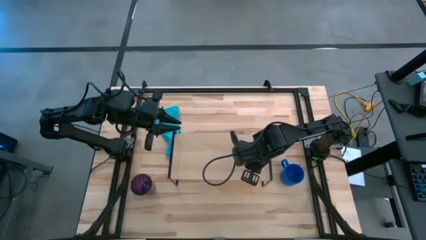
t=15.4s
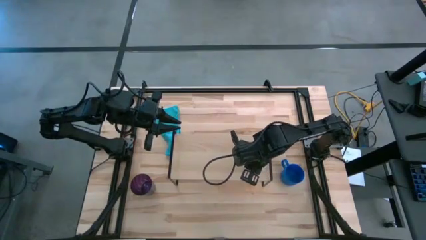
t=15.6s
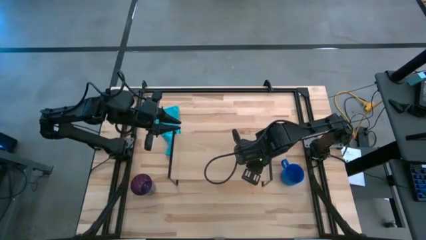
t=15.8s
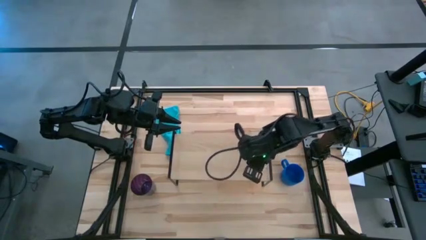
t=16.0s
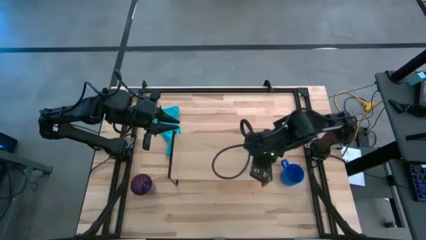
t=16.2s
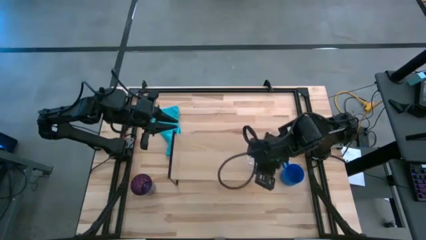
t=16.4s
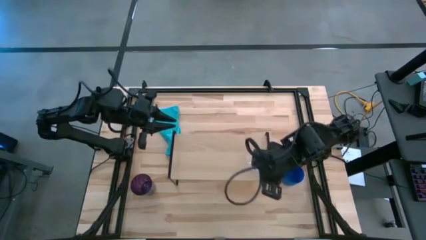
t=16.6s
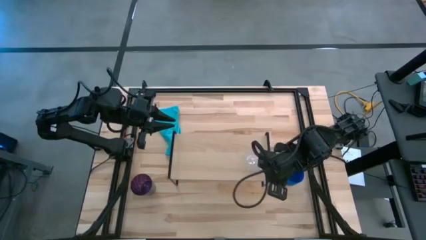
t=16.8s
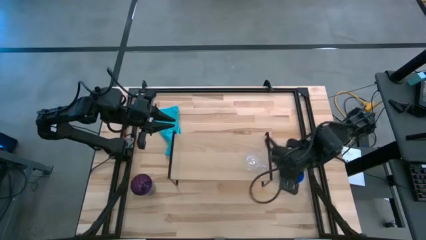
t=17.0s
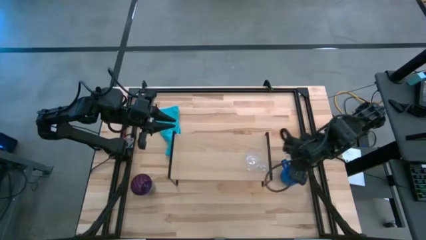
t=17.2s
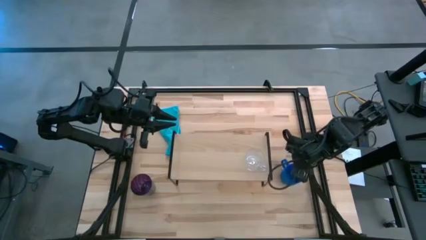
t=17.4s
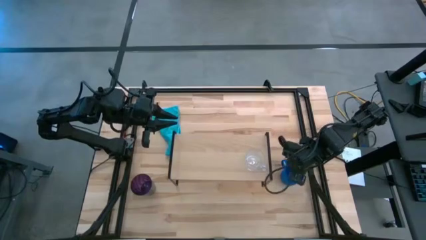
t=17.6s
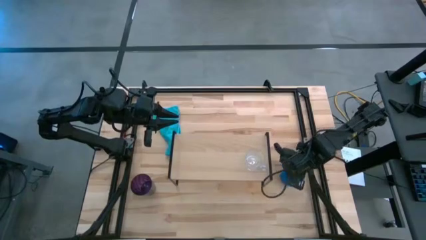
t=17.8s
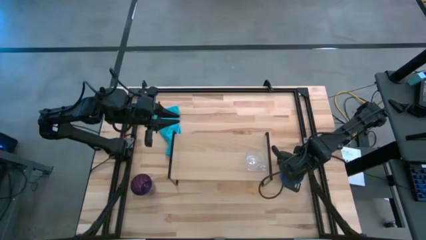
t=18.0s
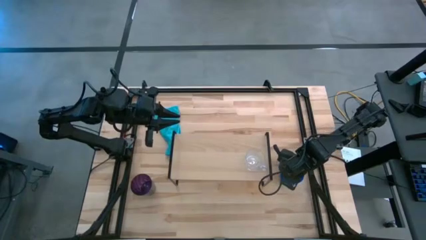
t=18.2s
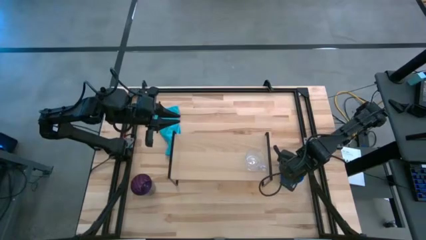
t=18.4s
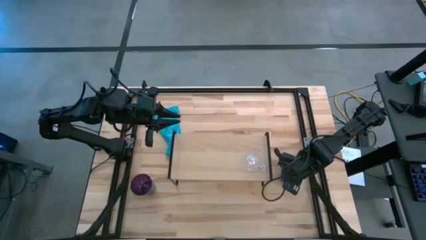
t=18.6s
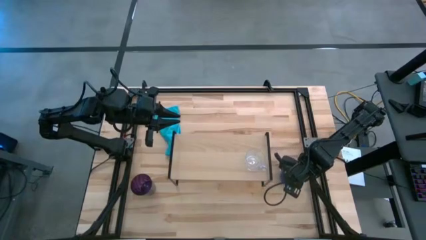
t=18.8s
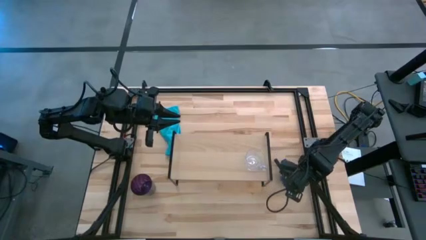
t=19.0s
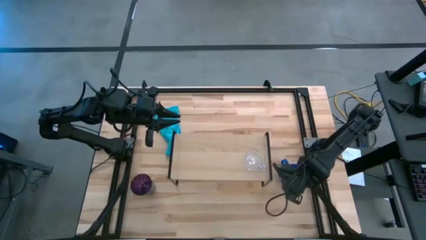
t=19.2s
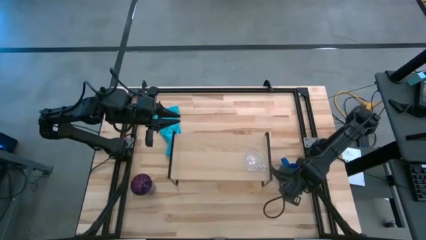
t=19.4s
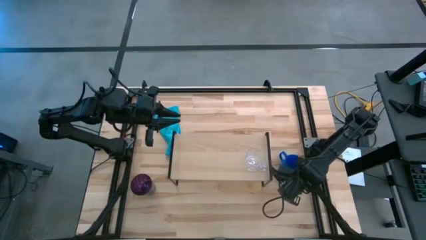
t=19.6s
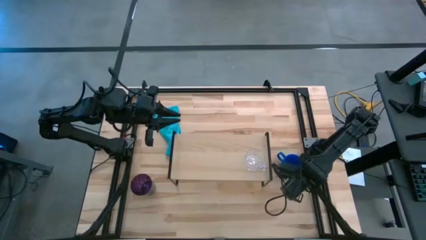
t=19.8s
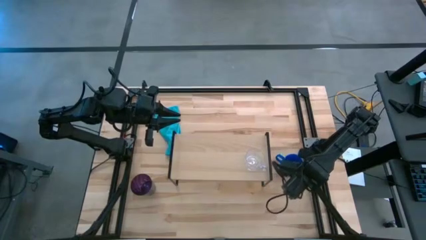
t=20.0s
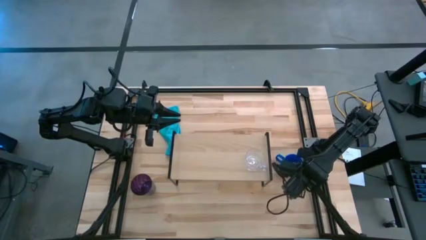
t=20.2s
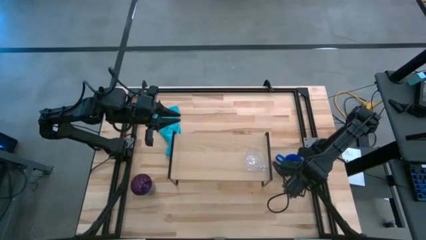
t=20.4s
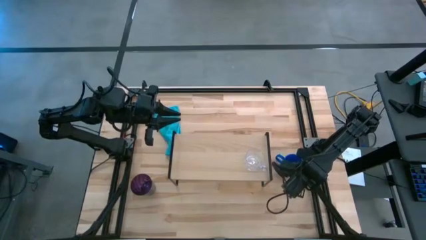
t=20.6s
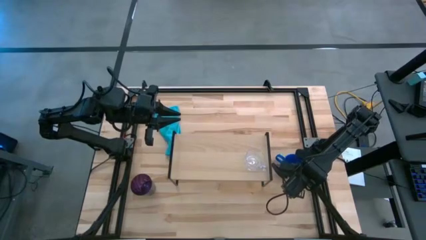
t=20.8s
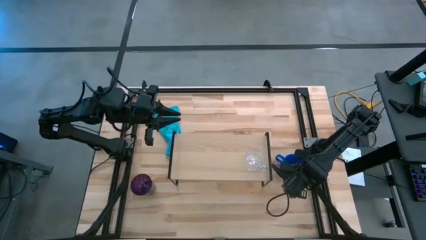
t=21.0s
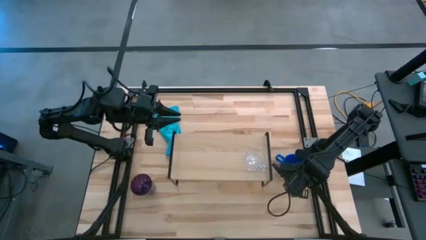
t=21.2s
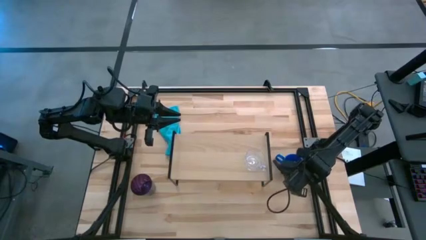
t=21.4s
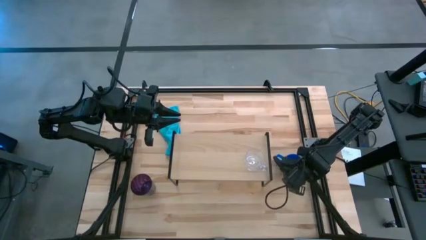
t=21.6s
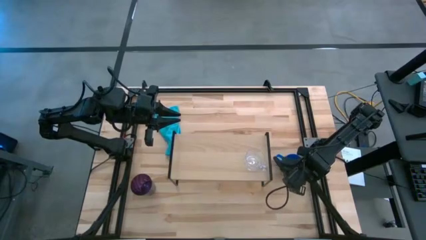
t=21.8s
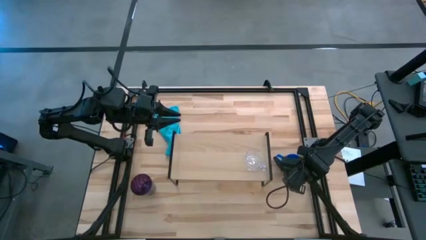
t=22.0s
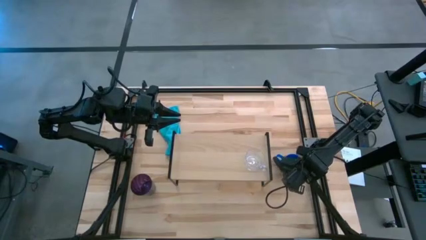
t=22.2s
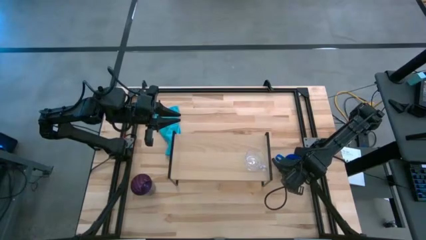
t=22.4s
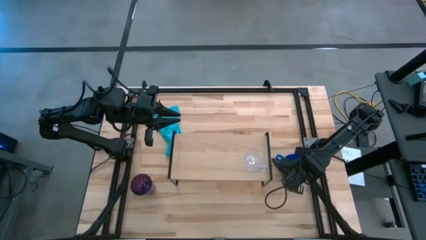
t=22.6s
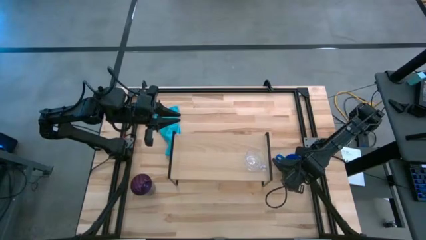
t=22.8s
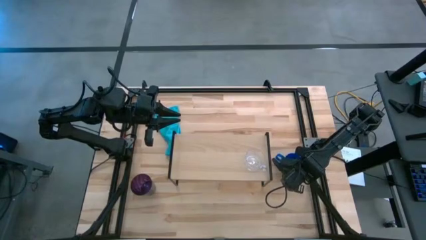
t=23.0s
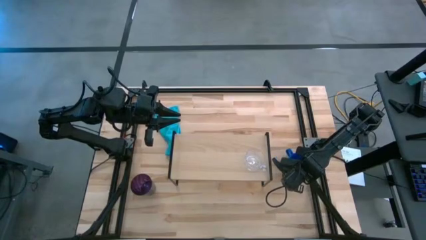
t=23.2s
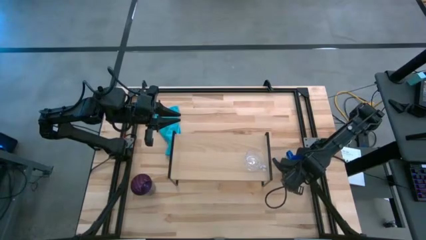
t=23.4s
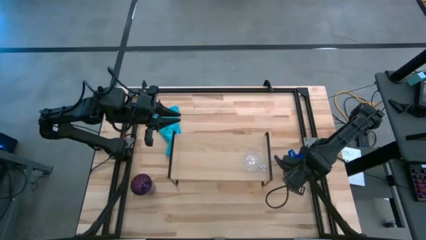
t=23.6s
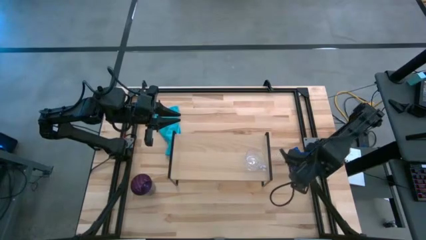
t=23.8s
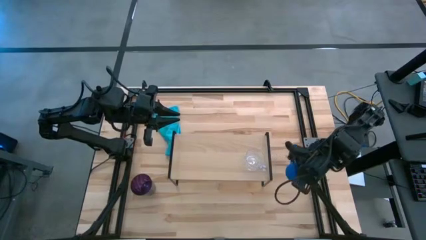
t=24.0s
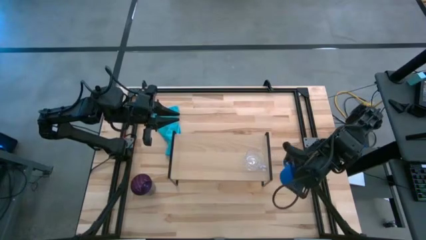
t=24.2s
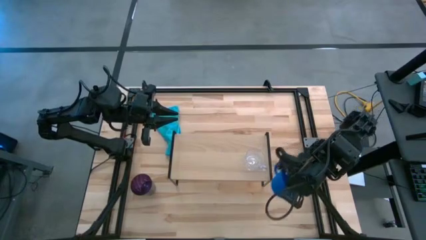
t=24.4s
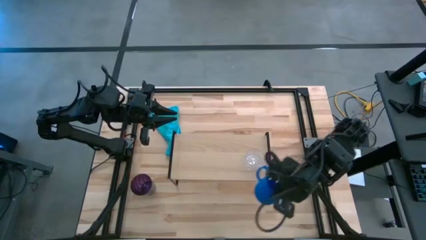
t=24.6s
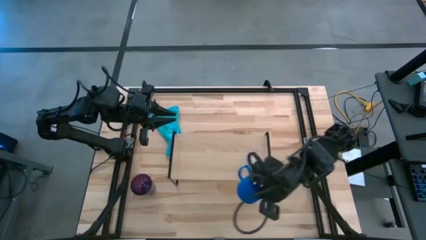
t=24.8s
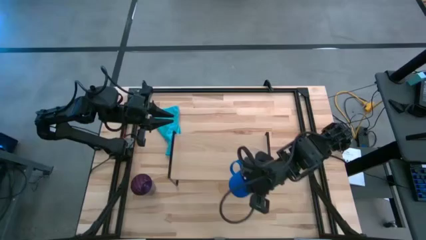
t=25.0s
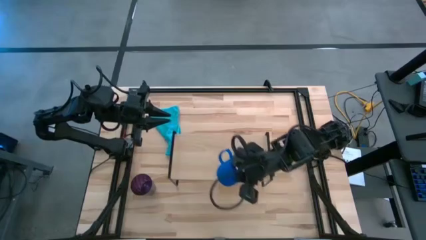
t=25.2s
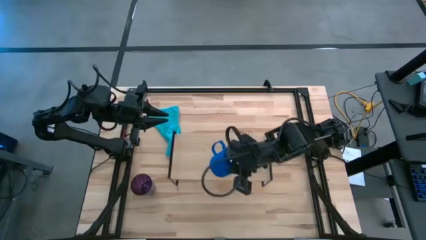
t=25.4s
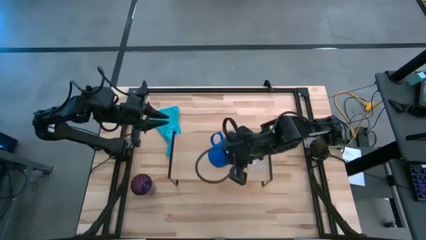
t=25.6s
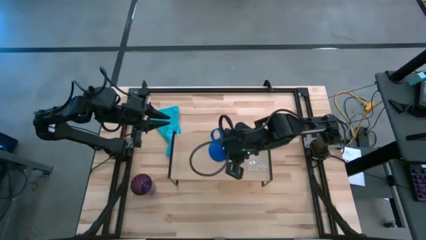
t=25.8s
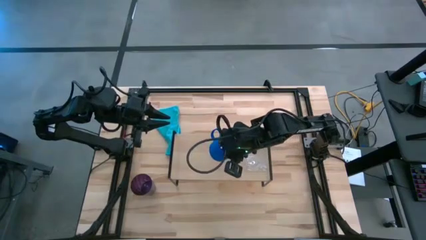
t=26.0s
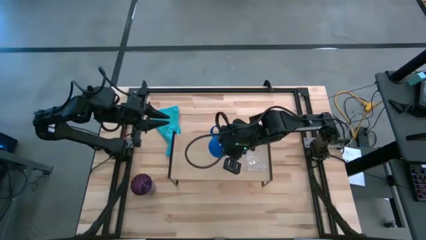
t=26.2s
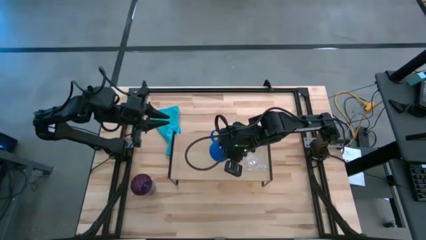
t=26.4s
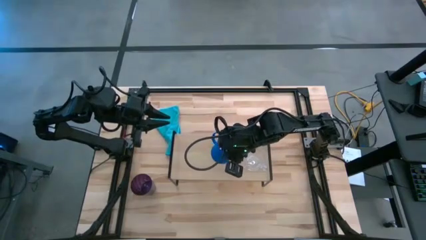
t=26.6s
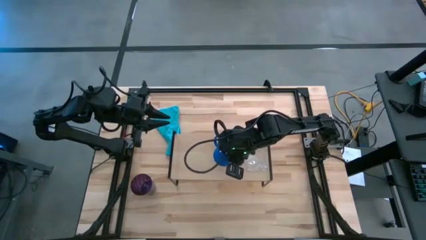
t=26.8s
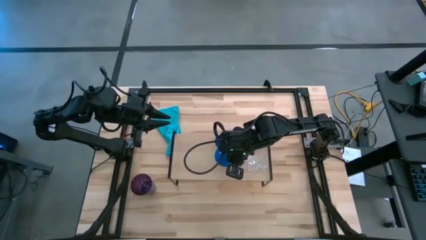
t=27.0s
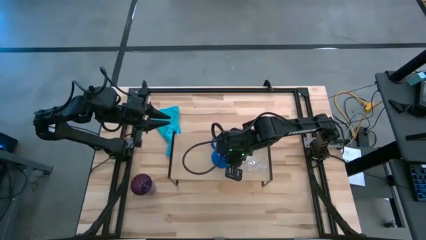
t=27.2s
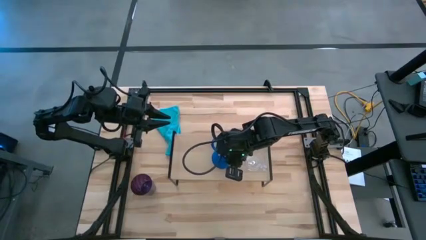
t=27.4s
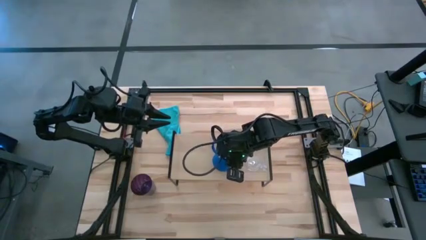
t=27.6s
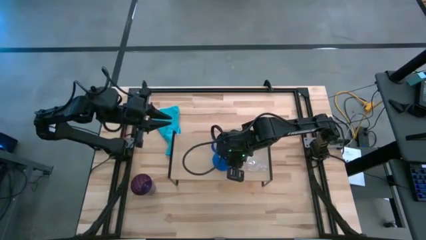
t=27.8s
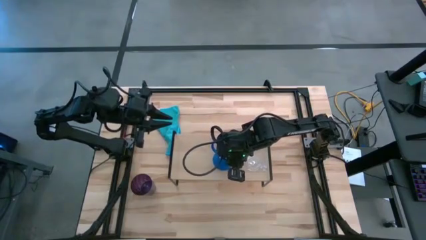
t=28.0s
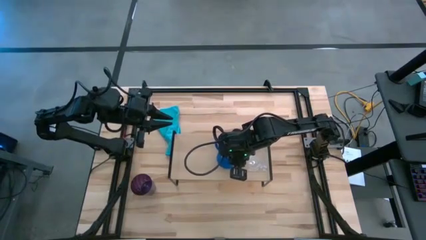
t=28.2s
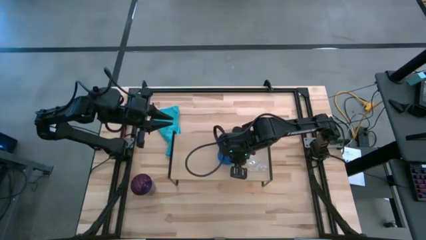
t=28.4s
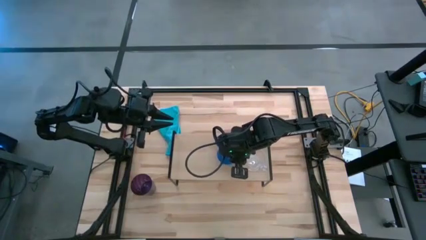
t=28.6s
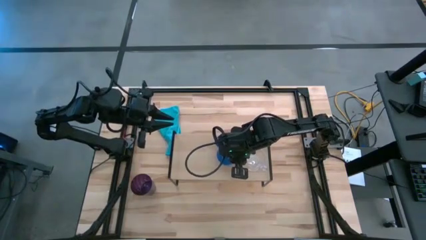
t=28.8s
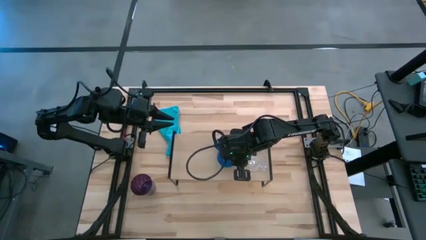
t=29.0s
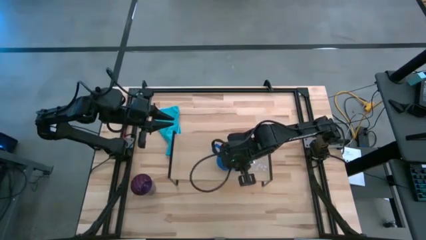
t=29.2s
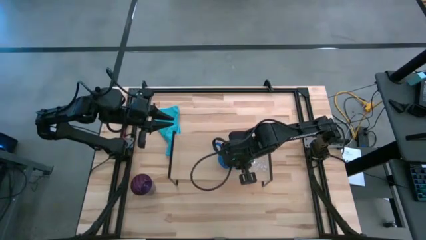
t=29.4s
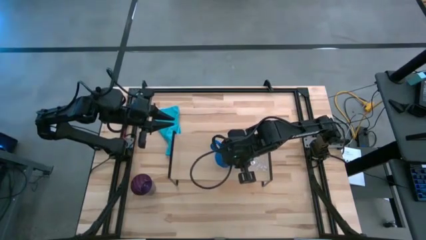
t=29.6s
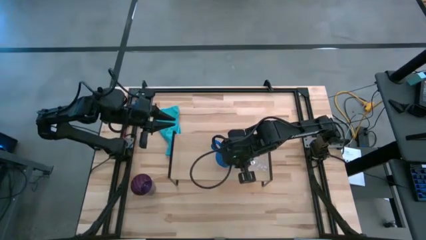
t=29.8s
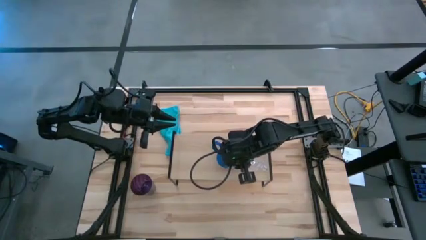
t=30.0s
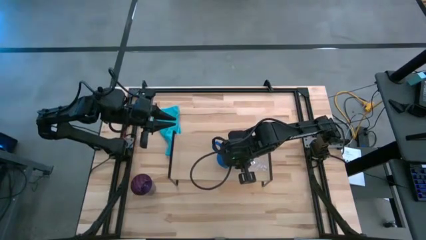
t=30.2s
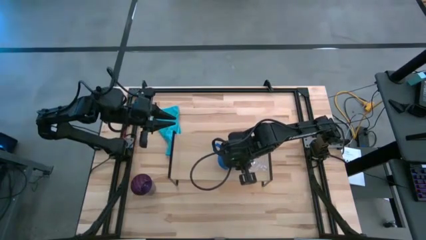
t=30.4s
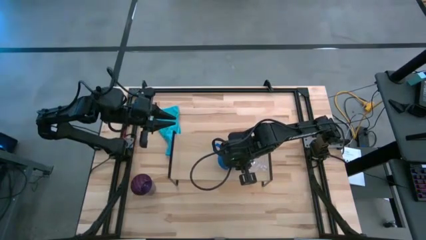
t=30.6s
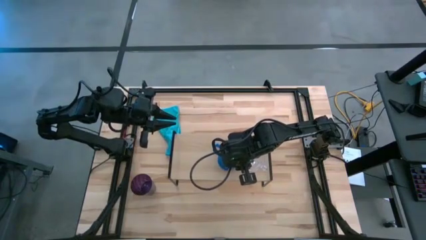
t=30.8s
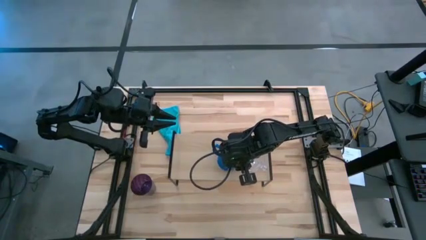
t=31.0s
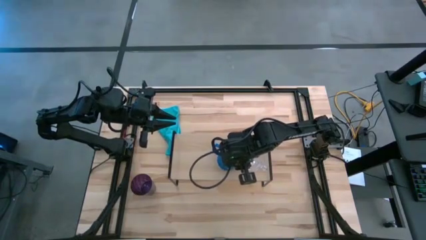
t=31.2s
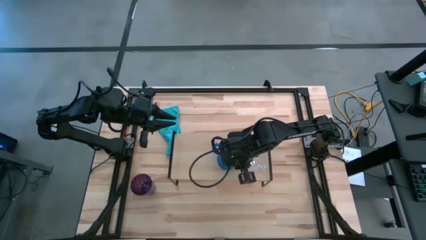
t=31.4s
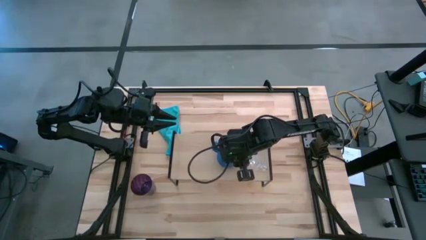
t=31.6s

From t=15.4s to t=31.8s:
Task: Stack small to large cups/mugs on shelf
Put the blue mug on the shelf
